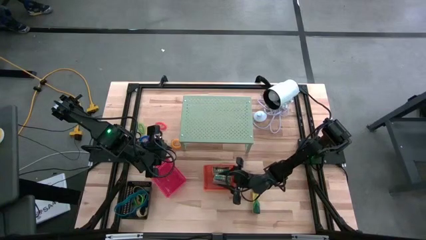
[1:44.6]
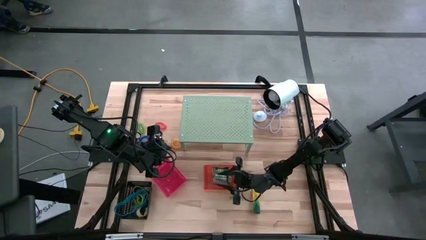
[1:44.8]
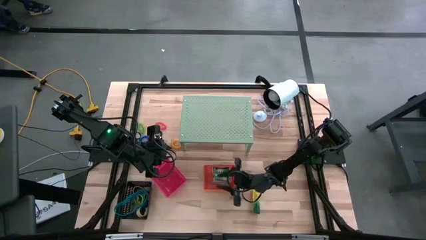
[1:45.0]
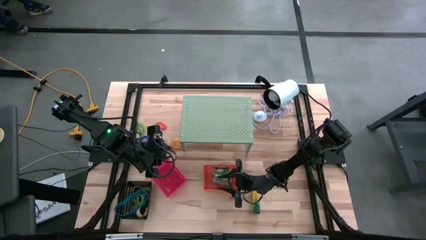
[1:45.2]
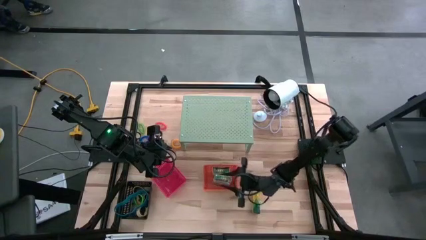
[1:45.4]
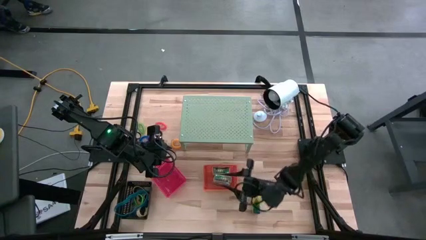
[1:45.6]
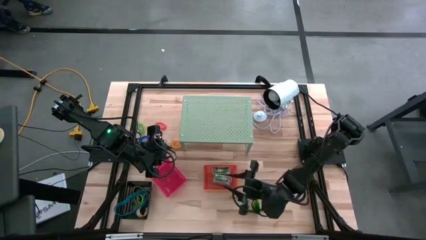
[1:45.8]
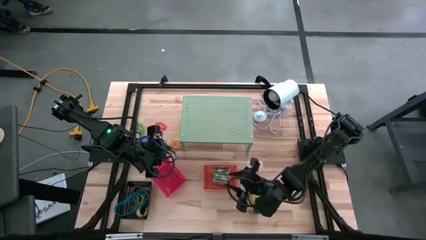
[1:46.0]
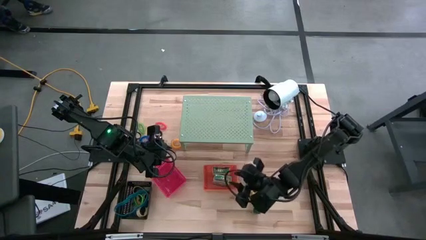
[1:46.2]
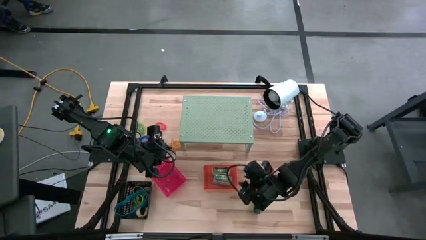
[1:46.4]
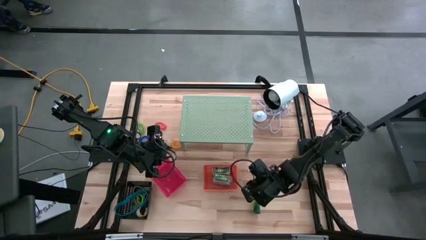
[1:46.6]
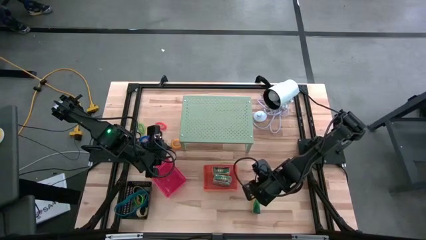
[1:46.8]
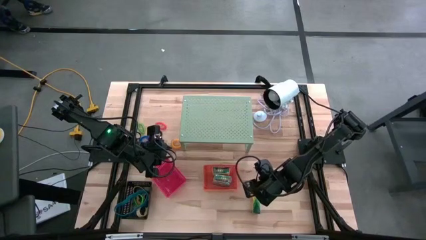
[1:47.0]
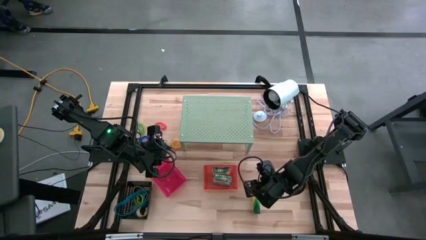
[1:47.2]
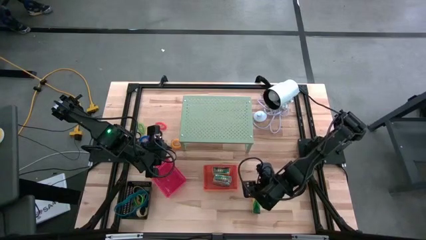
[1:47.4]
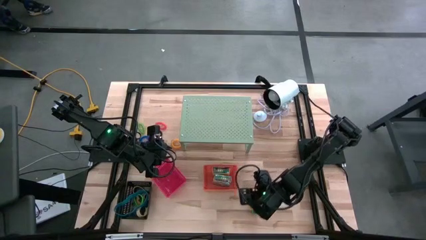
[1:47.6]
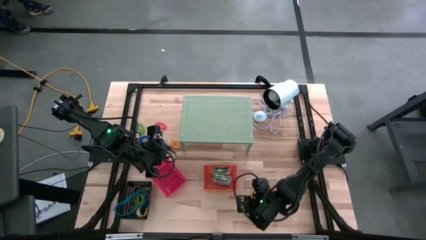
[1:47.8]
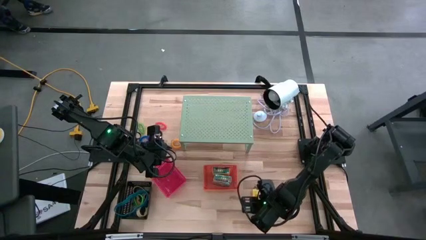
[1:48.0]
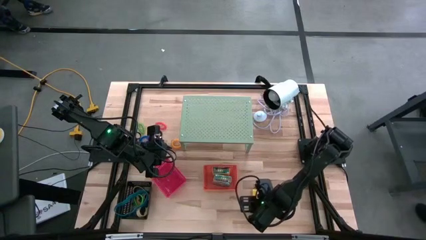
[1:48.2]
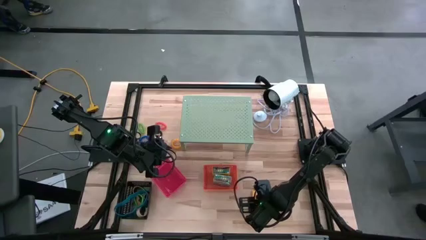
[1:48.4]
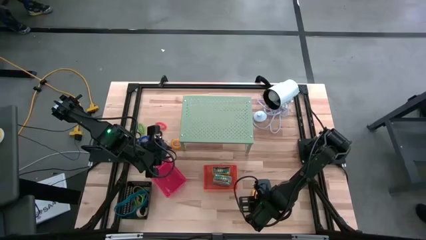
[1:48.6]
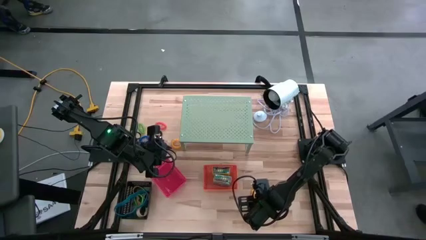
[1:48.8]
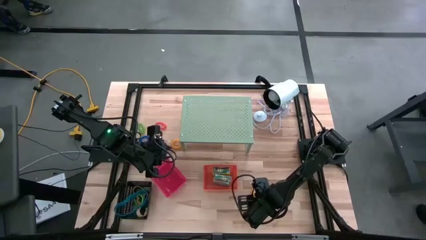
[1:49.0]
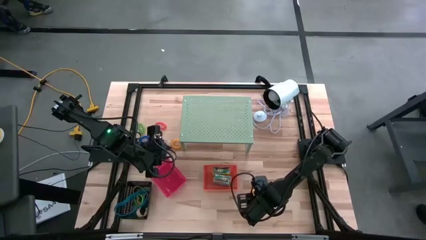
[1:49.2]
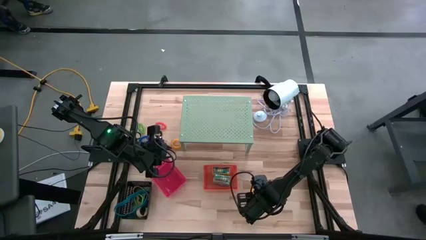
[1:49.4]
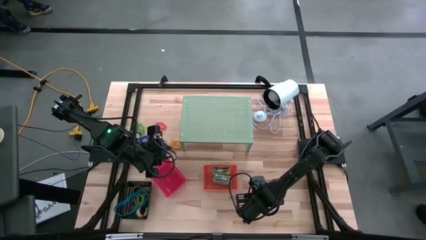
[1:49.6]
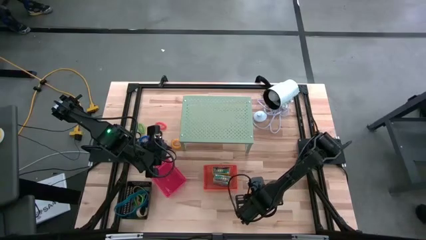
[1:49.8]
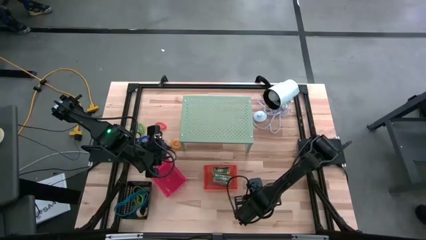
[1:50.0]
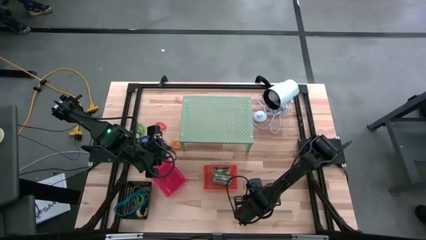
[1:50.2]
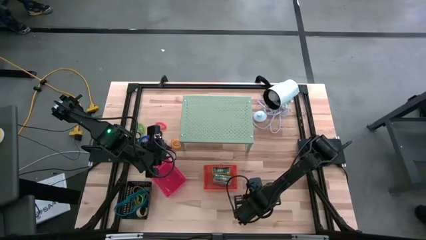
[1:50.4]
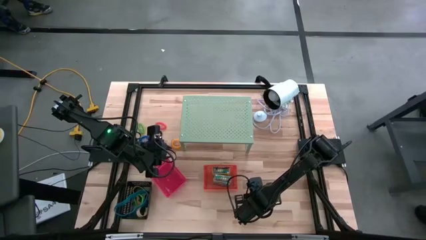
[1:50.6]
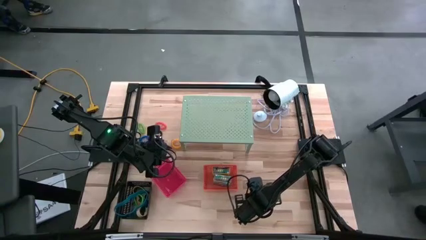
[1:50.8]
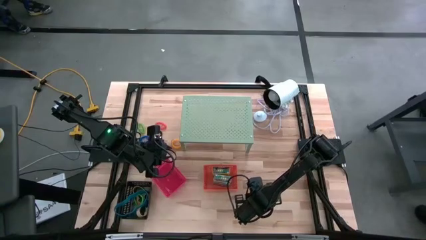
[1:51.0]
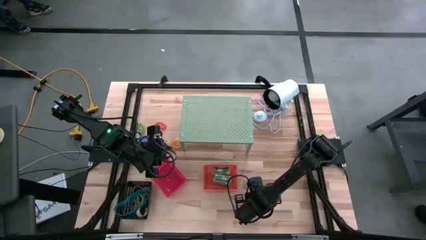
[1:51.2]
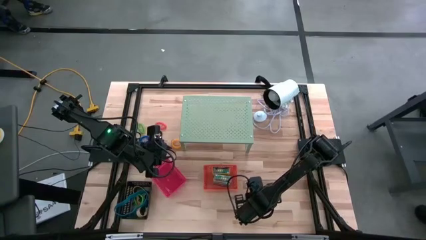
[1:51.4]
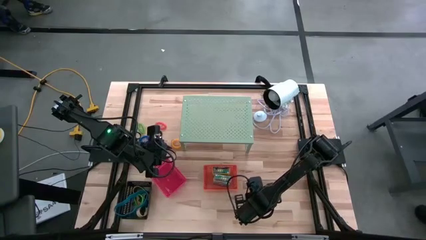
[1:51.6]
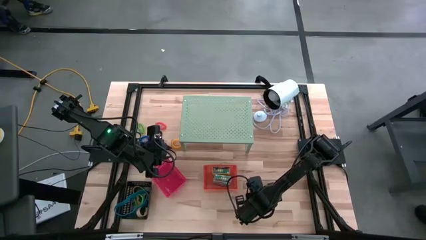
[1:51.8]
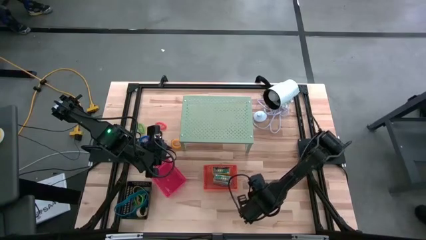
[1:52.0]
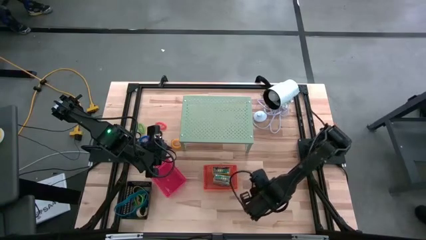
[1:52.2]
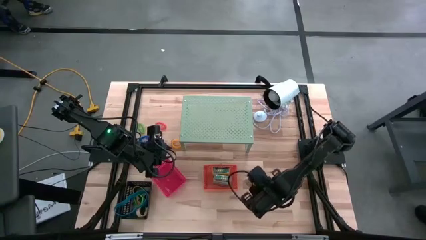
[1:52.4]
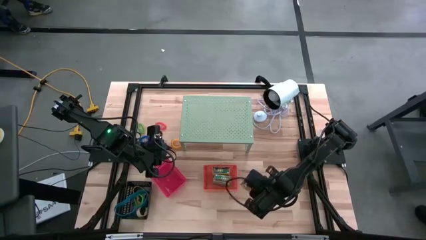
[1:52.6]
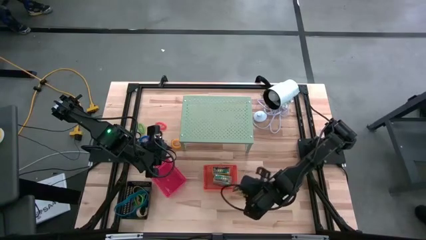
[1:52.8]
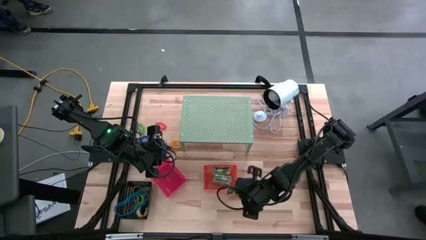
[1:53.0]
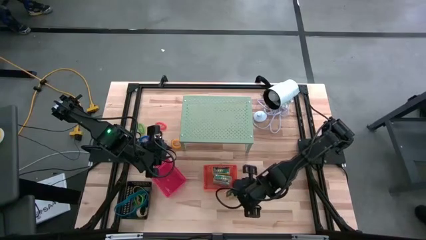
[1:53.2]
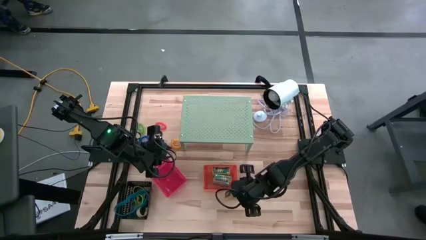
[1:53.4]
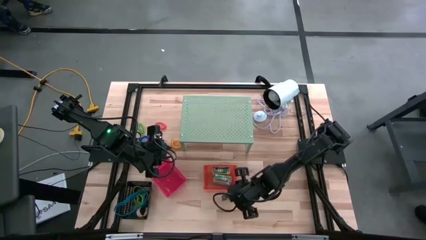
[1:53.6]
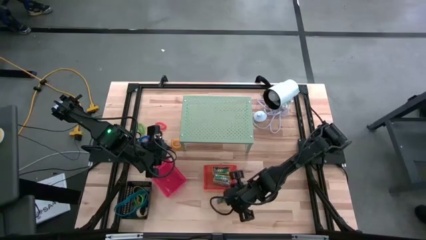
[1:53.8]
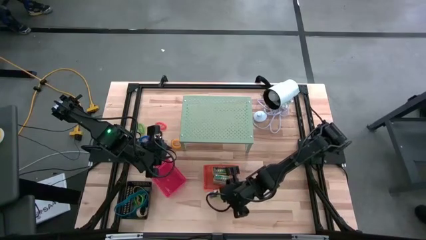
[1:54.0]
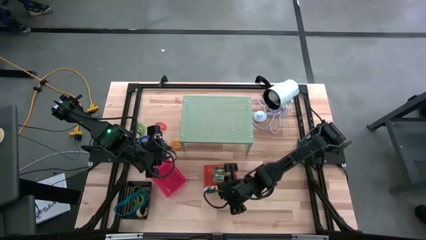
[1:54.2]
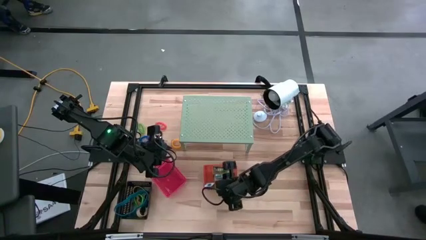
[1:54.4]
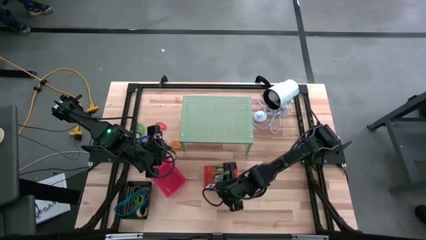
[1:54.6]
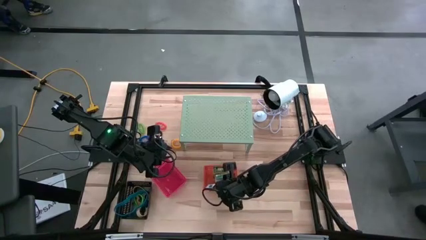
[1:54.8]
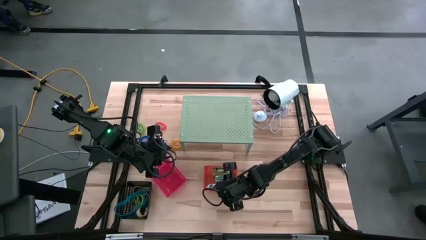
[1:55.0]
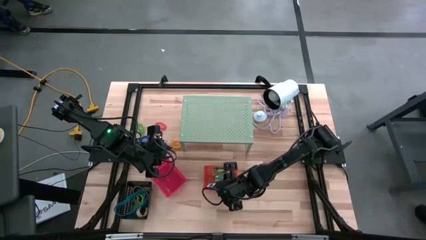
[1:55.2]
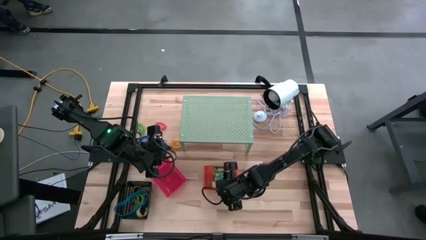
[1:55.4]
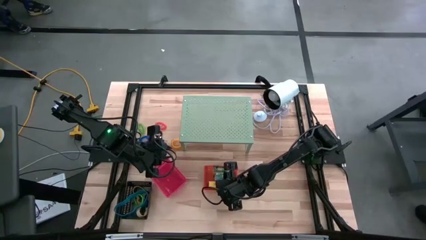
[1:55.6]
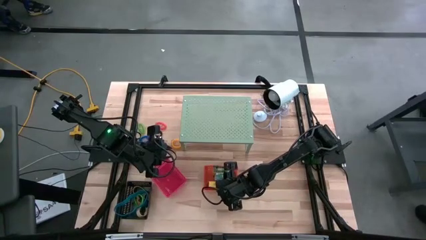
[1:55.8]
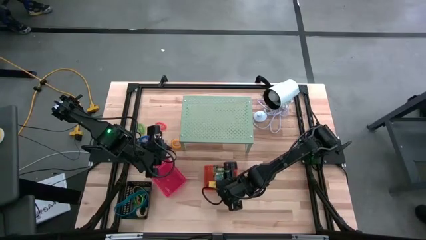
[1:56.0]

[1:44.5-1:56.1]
Task: Pick & Place Office Desk Supplies
Put the crayon box into the orange bin

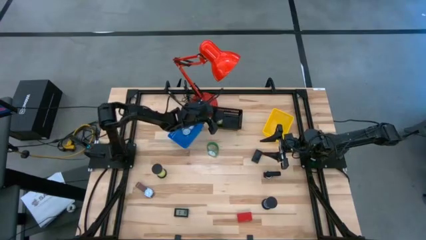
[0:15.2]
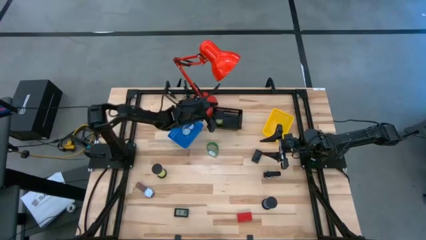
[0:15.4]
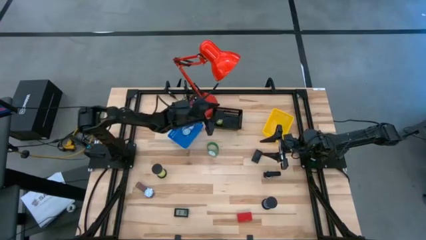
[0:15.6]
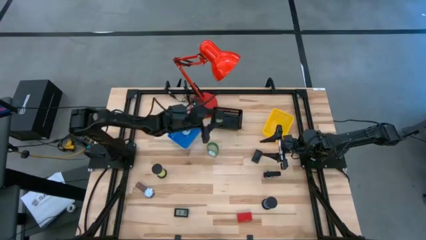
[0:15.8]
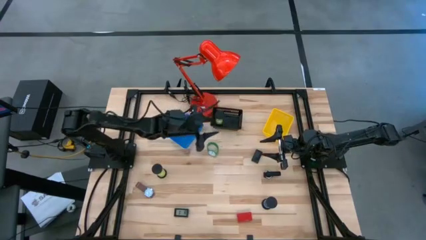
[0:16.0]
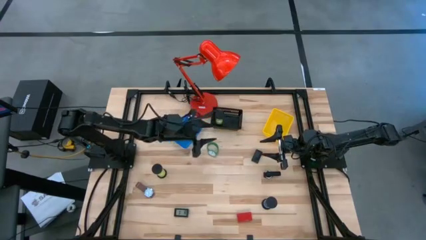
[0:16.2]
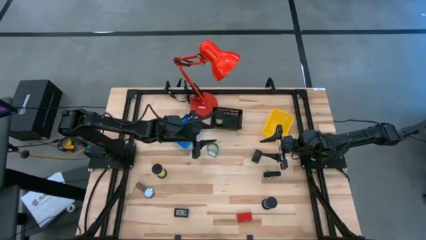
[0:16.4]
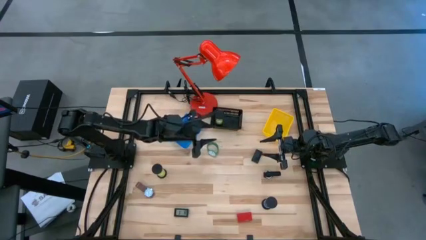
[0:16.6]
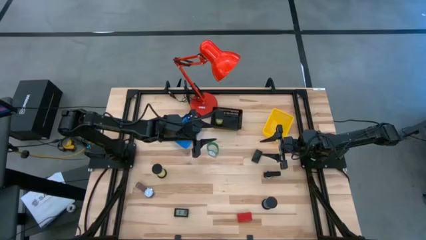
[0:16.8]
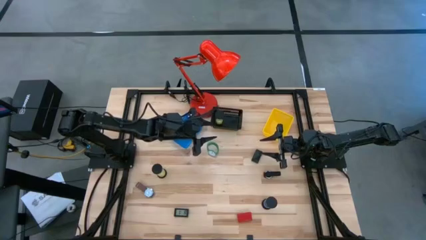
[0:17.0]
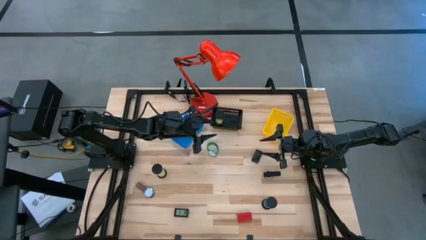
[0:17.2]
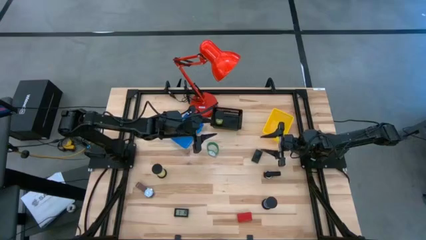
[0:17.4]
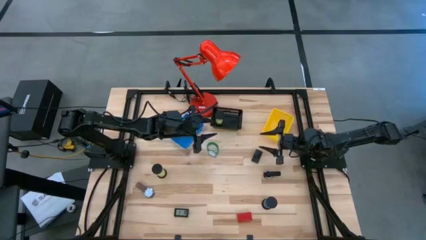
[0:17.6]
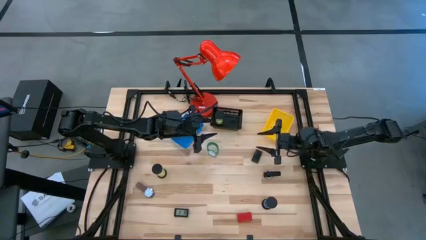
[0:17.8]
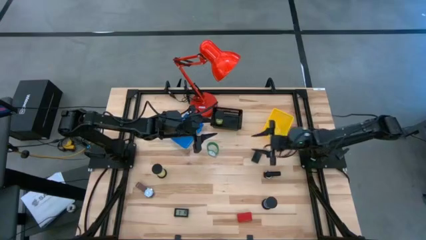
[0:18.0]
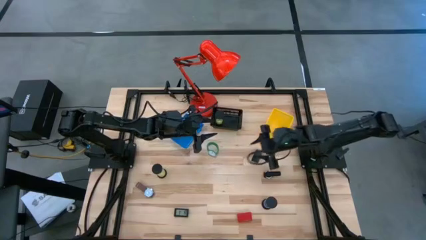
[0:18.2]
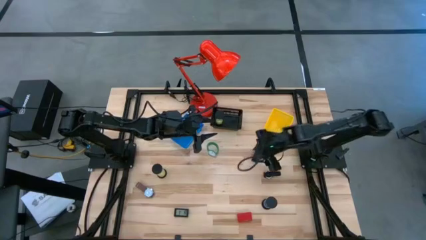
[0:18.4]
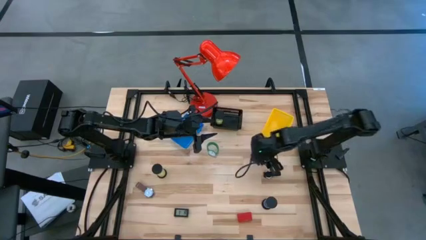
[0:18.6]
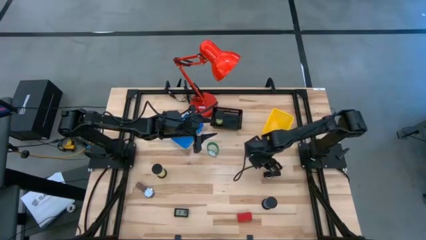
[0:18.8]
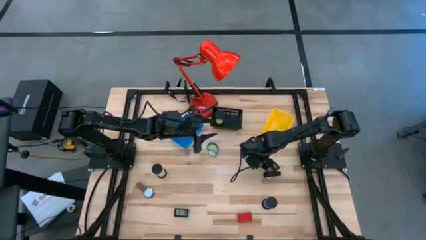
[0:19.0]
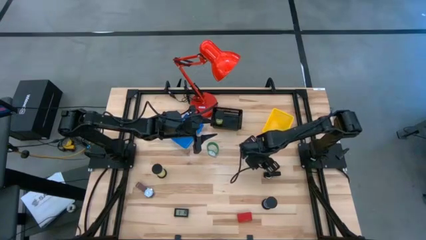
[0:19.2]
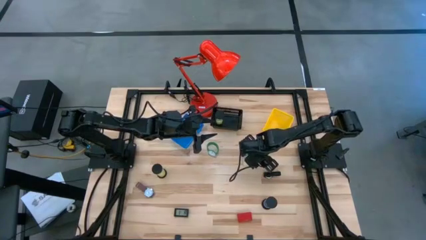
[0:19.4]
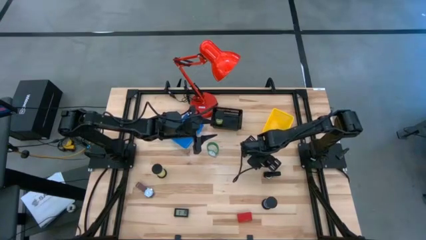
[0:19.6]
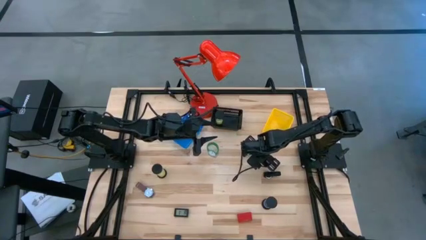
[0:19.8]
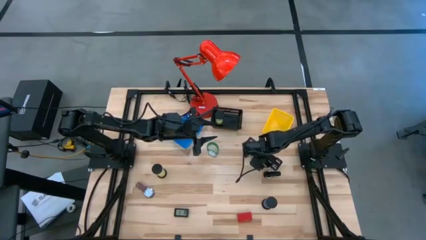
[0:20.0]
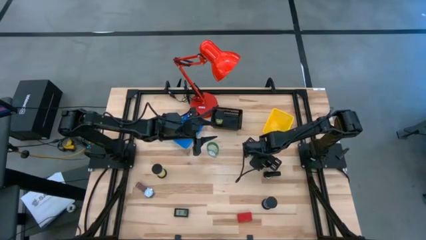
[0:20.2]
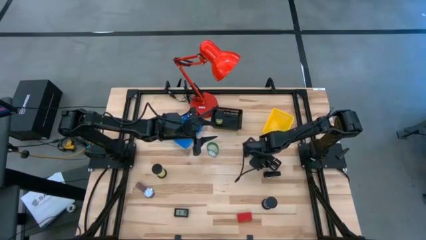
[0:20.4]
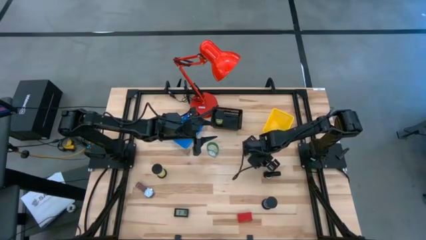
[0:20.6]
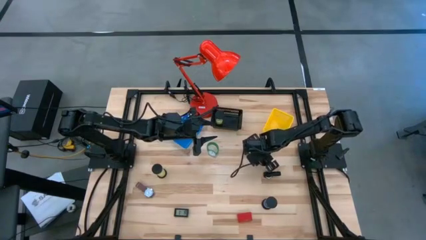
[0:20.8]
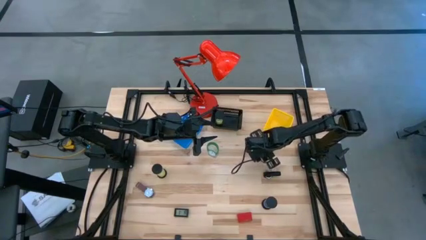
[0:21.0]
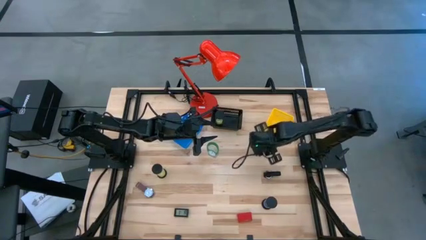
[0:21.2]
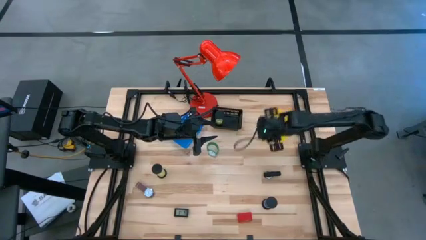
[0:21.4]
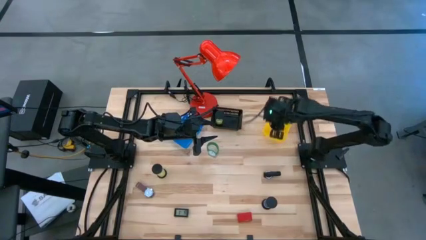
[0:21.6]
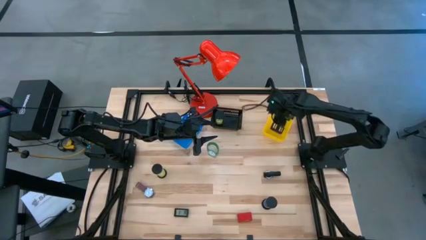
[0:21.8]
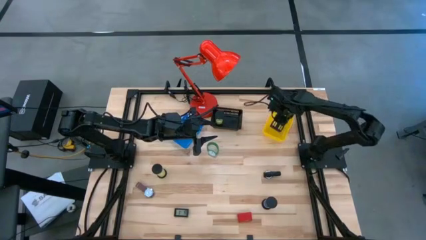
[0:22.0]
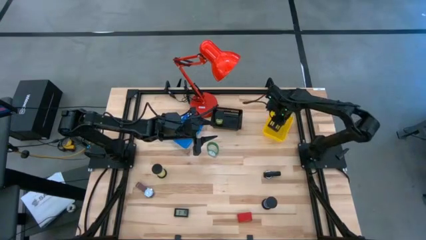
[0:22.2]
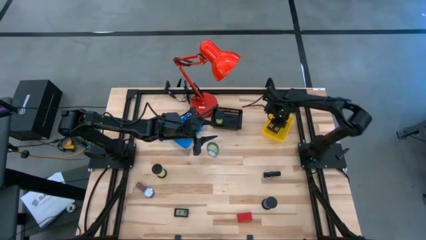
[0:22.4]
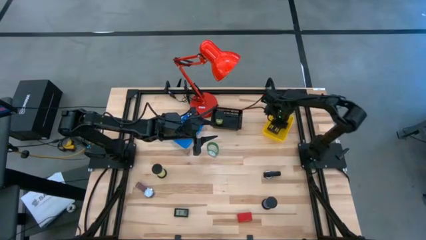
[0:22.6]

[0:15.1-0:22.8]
Task: Pick & Place Office items
Put the top right black digital timer into the yellow bin
